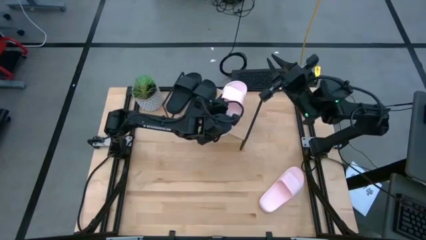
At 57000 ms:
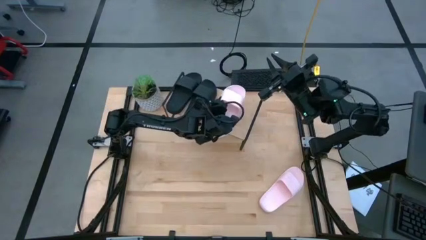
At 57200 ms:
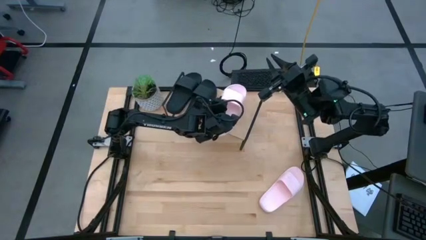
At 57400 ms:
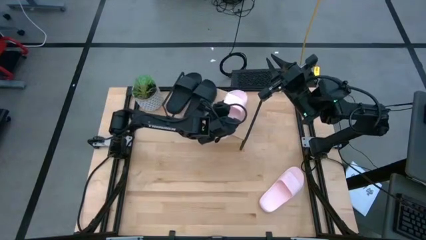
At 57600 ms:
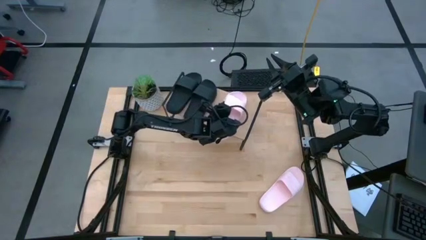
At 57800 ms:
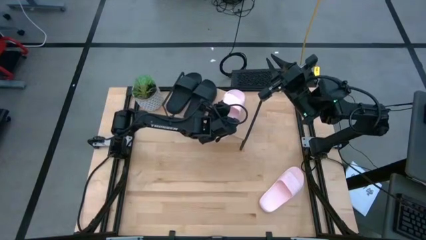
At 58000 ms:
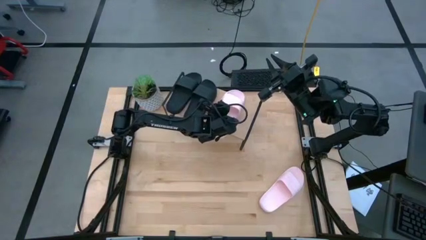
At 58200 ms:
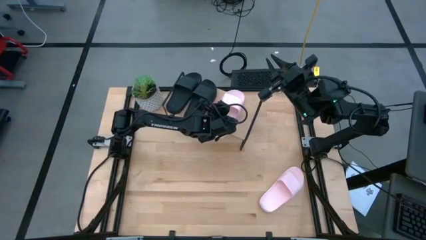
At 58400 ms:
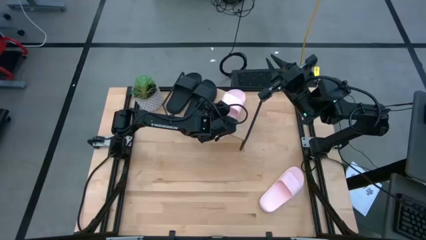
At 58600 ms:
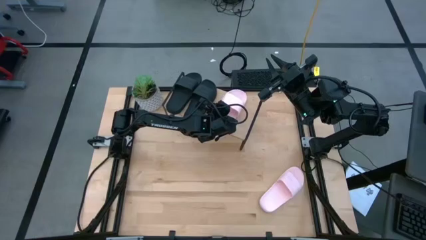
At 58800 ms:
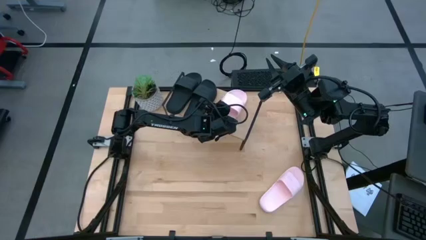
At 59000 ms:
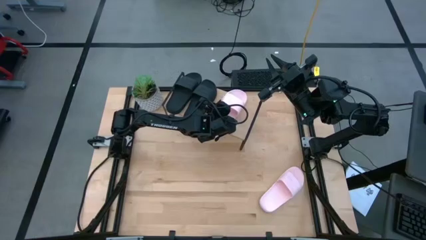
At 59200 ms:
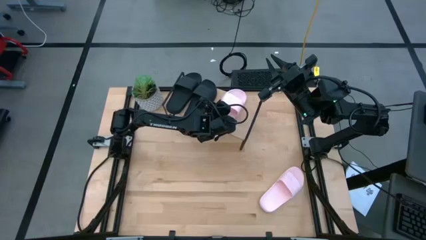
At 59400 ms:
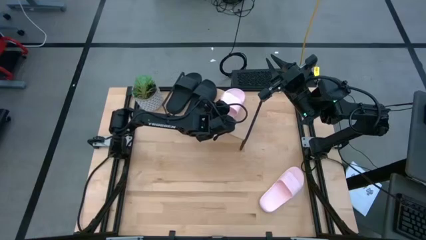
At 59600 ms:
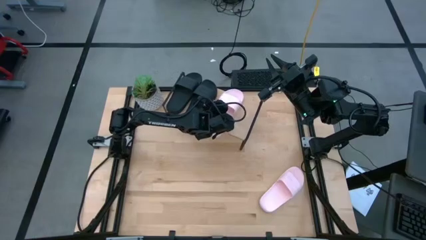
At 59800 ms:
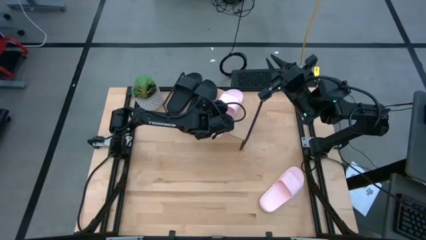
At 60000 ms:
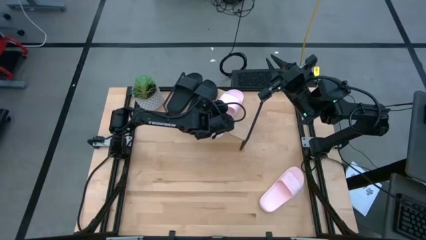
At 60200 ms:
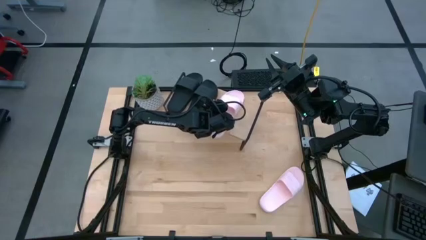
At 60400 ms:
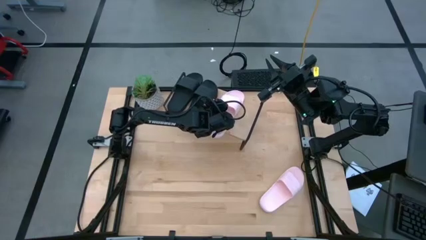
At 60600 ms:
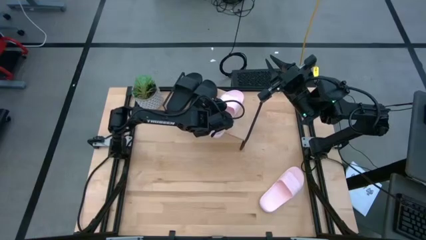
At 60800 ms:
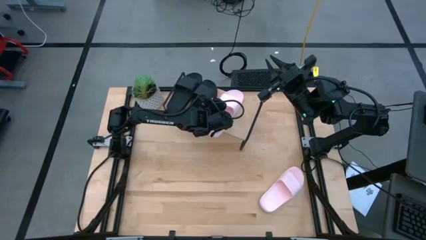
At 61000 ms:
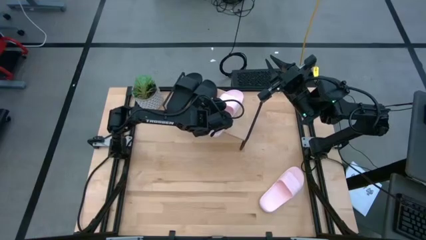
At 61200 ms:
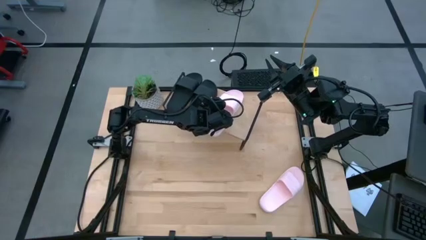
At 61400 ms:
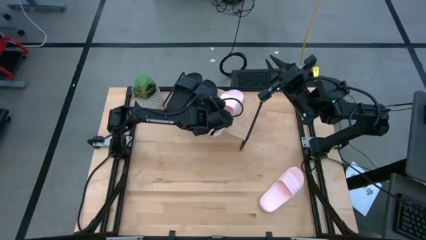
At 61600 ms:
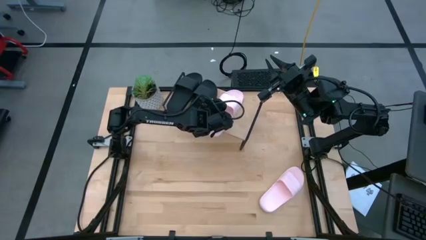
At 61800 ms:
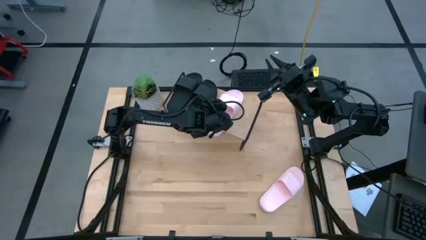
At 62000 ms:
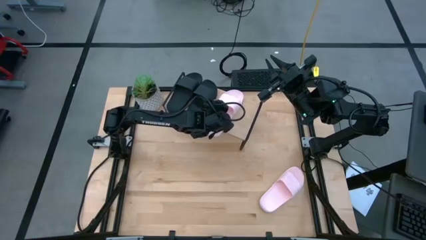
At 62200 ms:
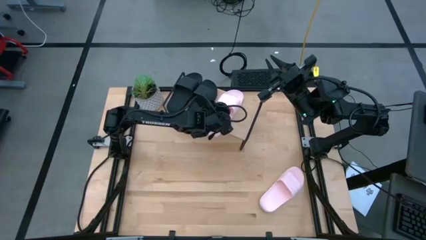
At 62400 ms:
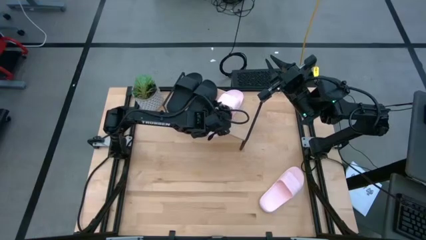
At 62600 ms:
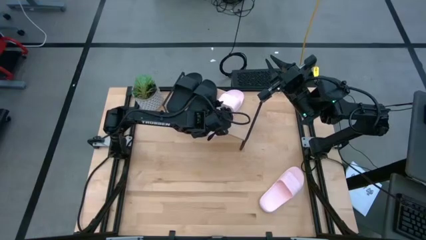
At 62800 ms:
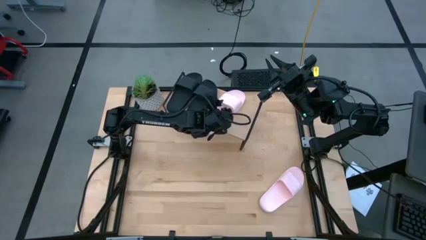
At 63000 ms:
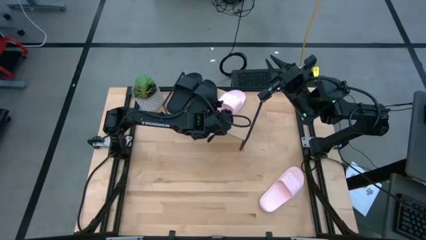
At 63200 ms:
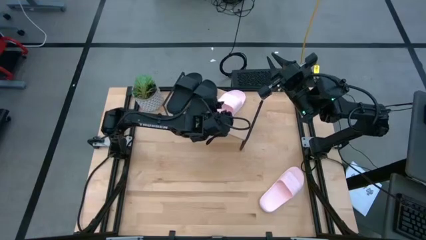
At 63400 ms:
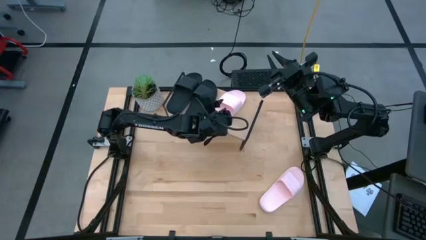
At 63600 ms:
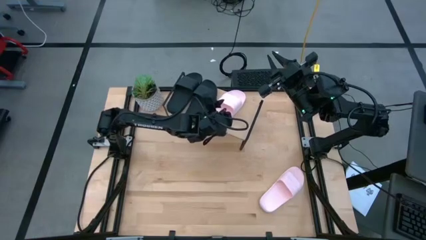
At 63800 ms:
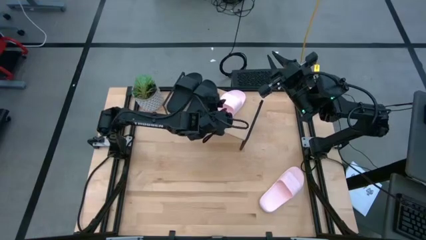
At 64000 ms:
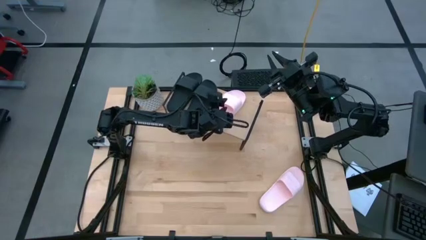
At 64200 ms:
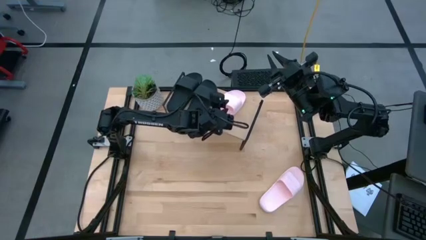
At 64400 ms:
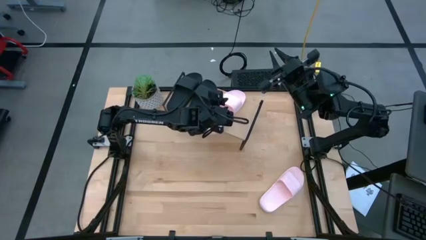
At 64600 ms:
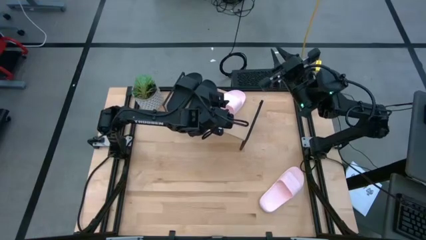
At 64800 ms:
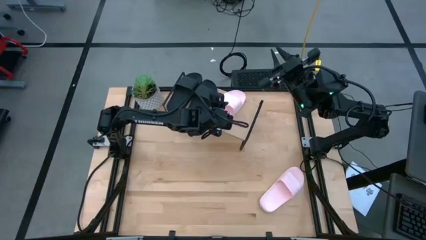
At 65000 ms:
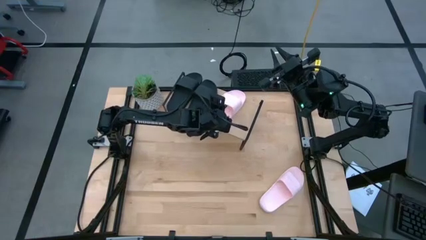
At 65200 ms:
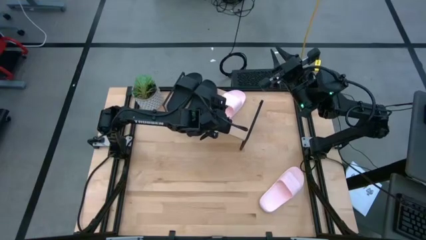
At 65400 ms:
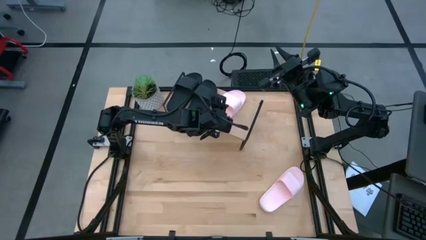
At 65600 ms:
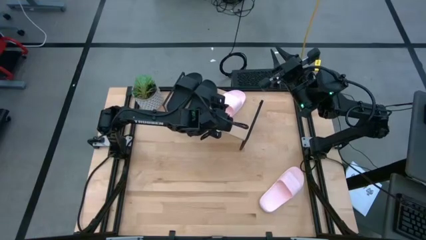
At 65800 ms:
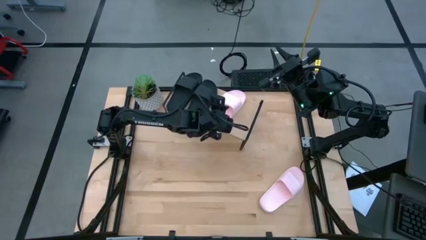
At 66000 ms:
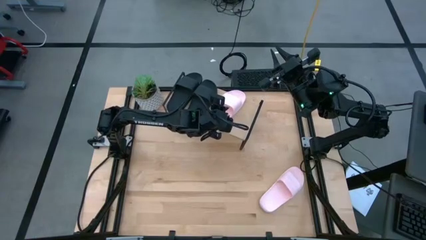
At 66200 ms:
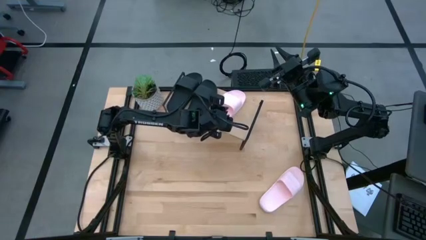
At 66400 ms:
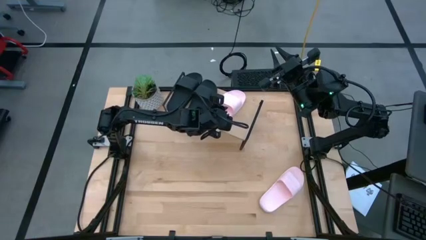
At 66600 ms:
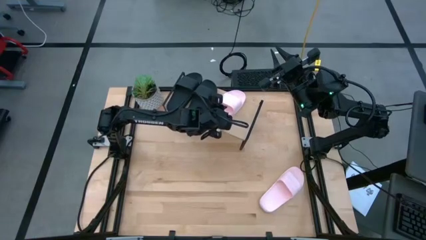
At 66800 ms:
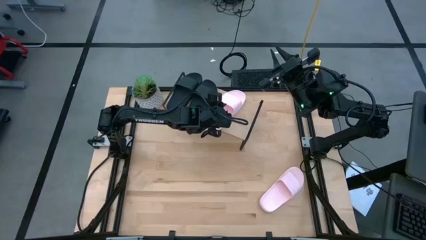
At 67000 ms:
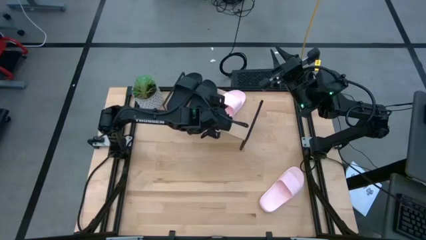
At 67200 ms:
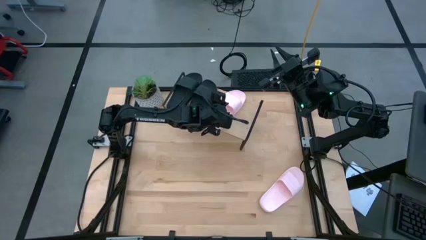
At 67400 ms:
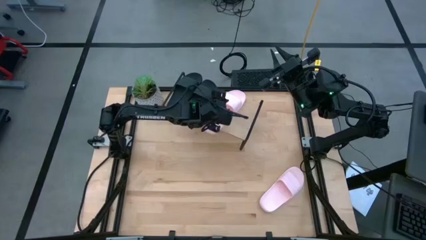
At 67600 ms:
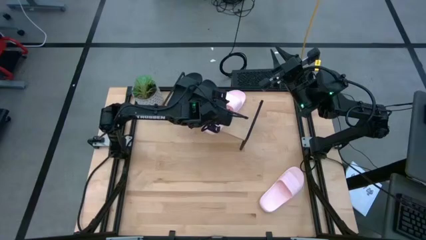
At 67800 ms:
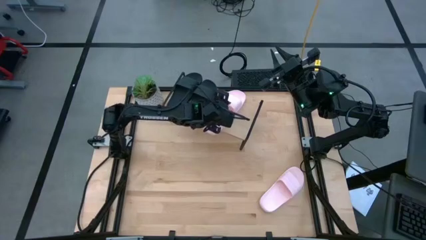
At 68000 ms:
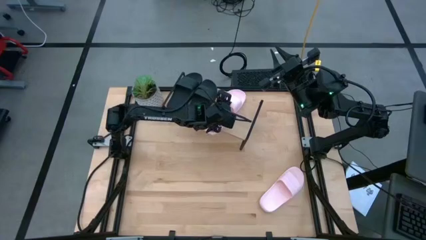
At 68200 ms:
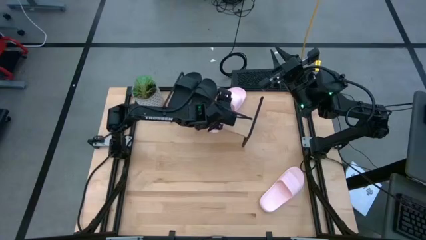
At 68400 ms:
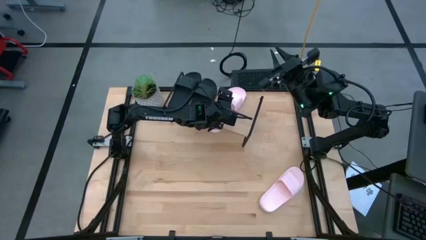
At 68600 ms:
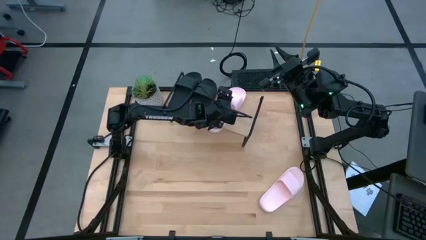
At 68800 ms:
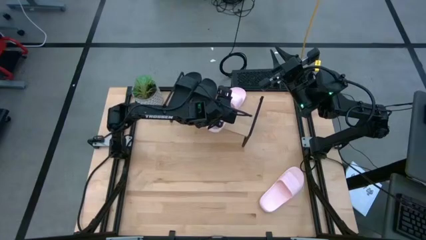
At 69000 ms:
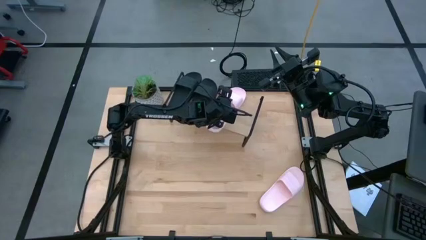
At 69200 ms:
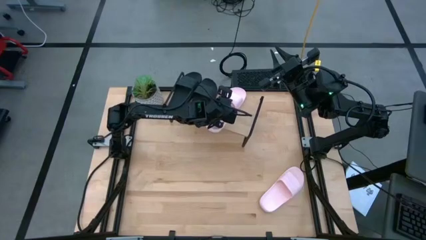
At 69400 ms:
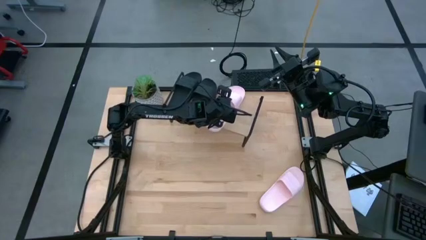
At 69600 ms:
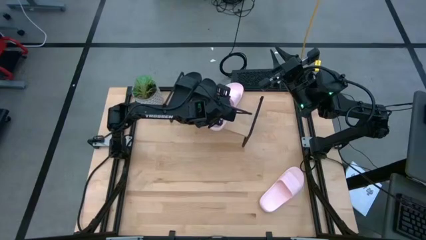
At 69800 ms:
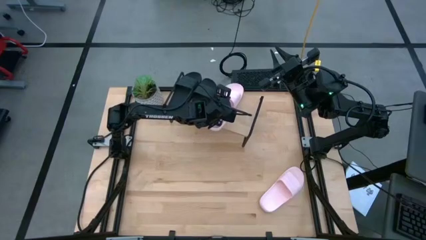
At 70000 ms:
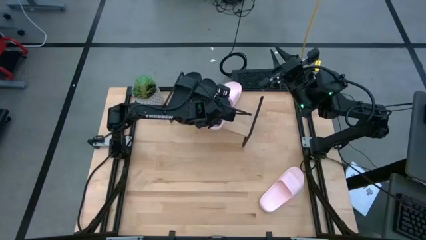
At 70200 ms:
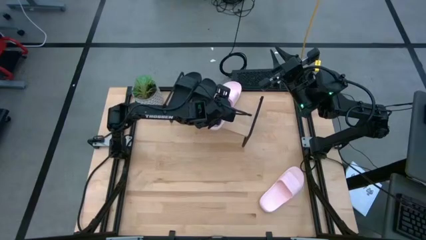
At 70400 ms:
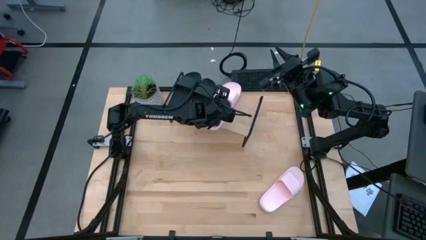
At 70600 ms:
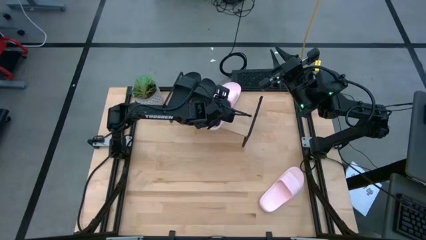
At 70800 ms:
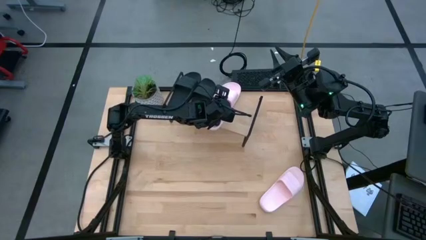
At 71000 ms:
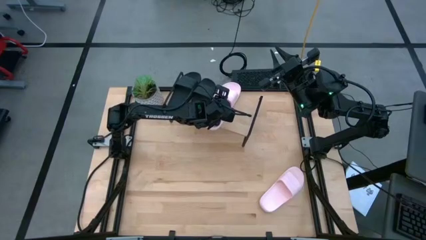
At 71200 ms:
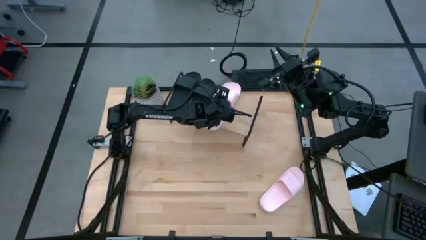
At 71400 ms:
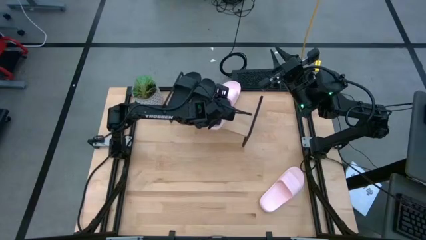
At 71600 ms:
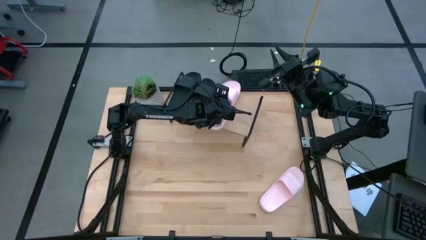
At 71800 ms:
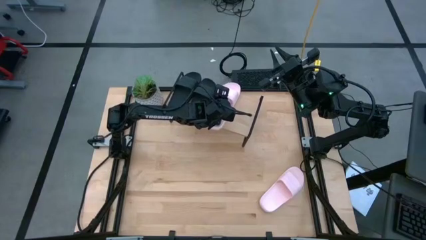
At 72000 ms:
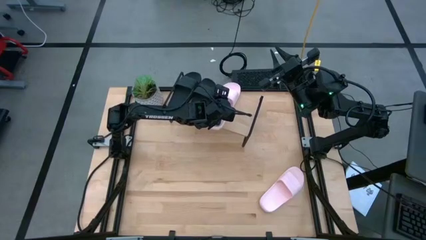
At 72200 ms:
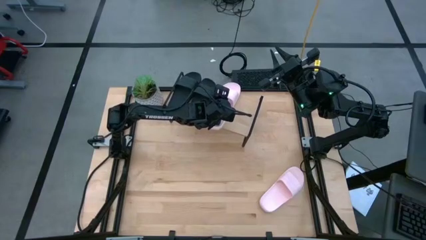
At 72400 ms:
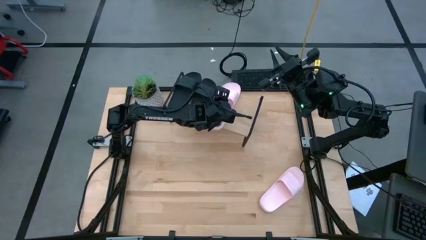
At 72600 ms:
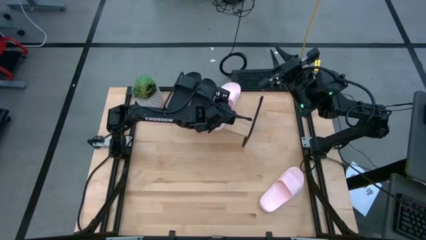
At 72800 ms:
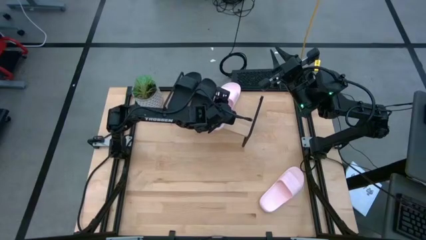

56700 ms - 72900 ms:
Task: Pick and place slides into the shelf
Put the left pink slipper on the shelf
